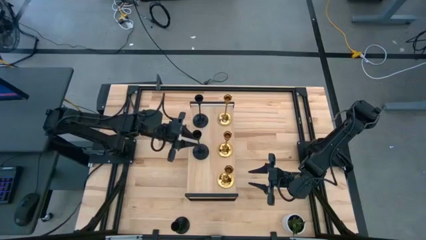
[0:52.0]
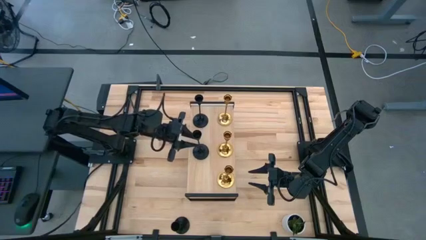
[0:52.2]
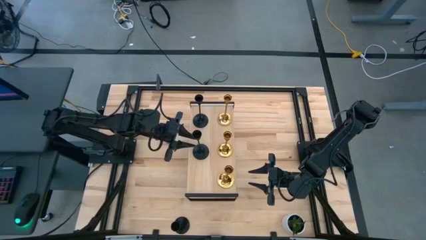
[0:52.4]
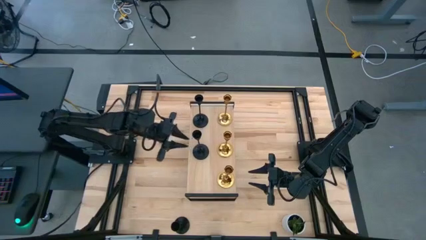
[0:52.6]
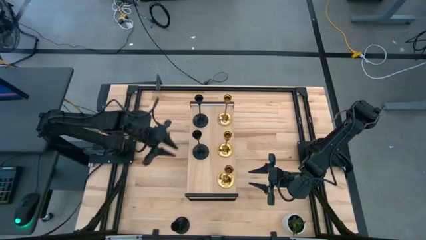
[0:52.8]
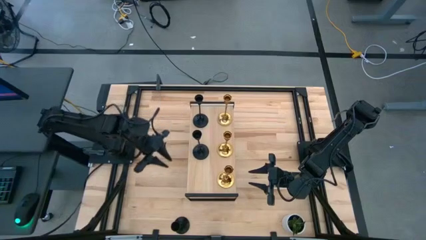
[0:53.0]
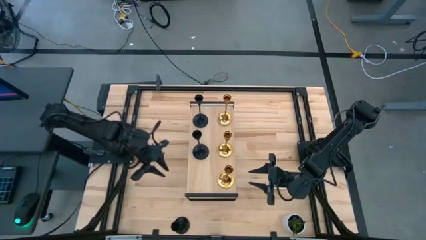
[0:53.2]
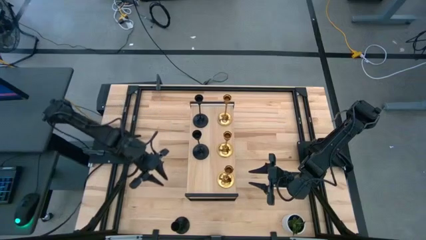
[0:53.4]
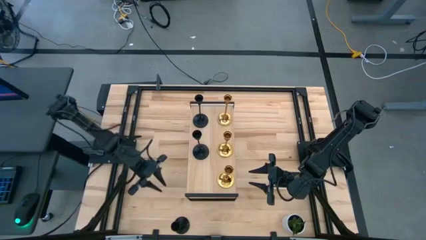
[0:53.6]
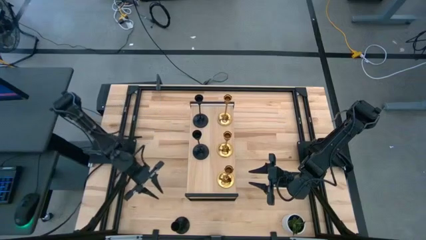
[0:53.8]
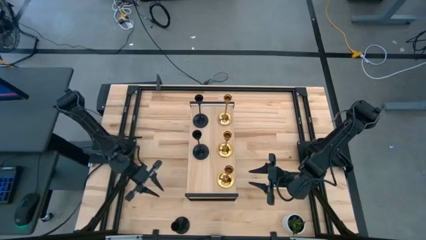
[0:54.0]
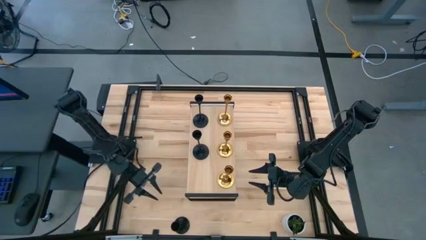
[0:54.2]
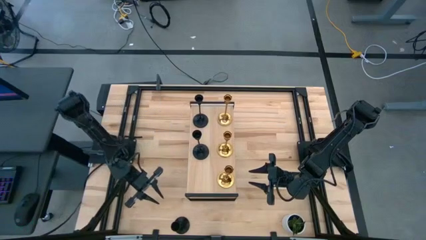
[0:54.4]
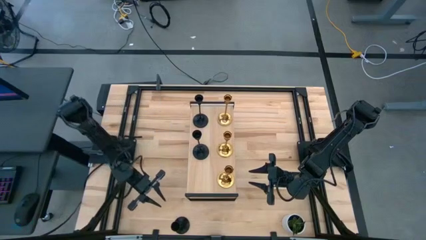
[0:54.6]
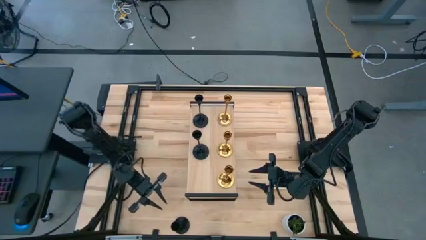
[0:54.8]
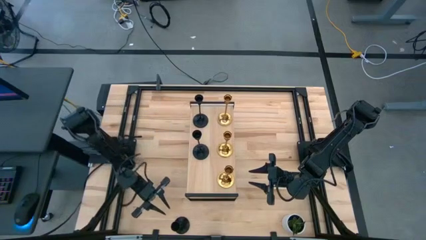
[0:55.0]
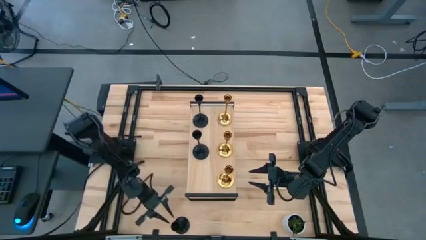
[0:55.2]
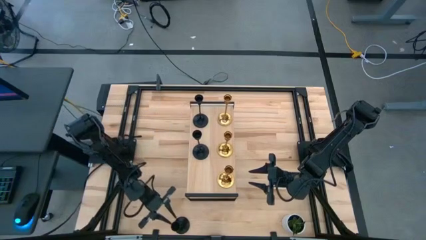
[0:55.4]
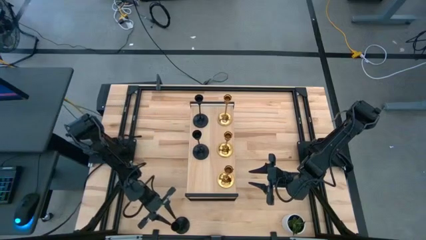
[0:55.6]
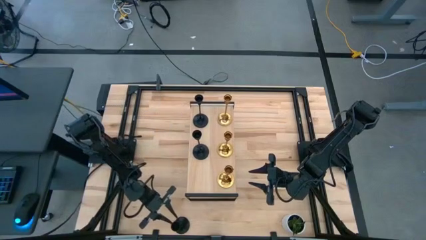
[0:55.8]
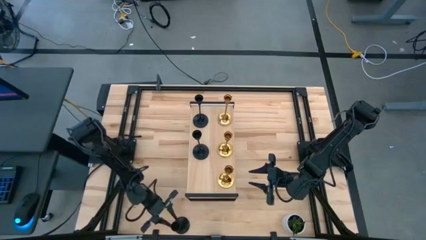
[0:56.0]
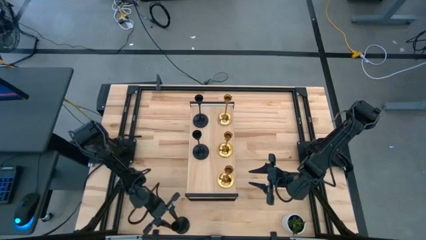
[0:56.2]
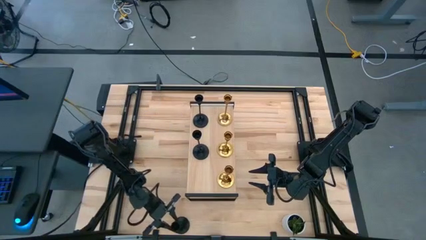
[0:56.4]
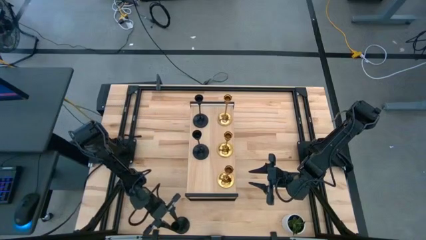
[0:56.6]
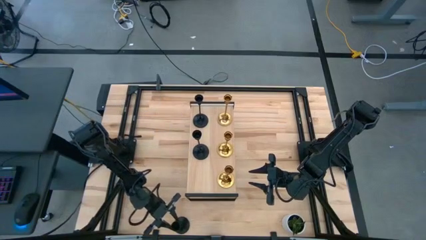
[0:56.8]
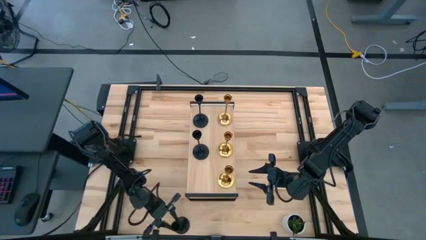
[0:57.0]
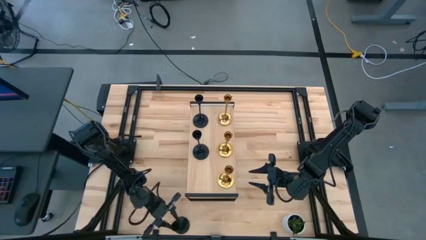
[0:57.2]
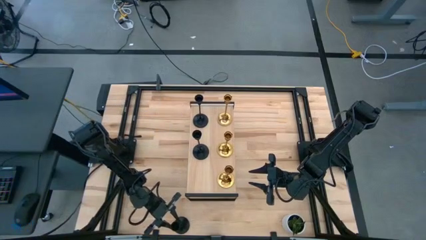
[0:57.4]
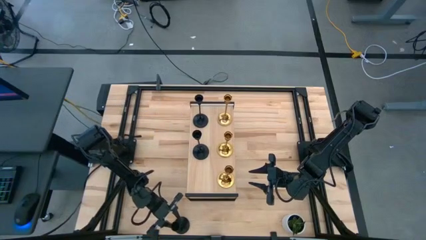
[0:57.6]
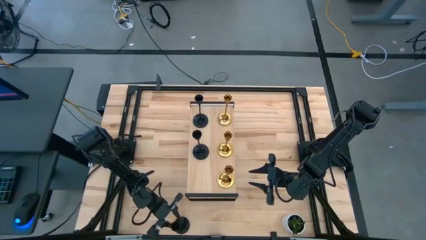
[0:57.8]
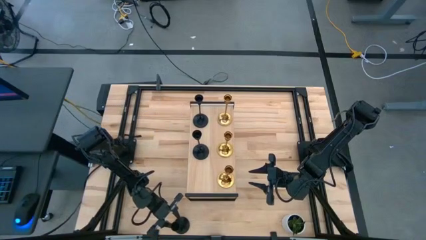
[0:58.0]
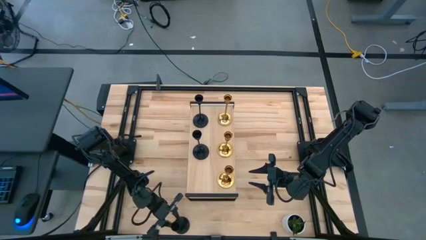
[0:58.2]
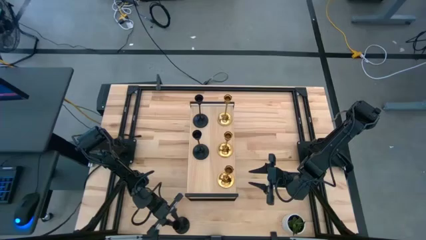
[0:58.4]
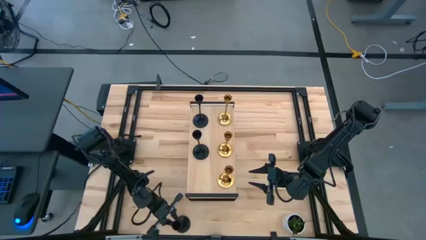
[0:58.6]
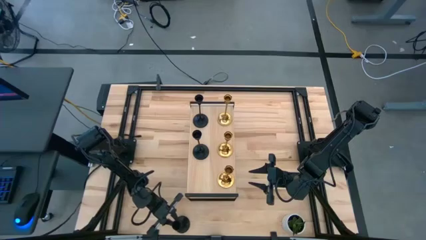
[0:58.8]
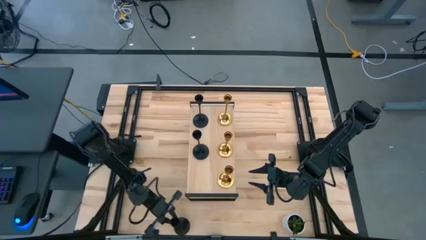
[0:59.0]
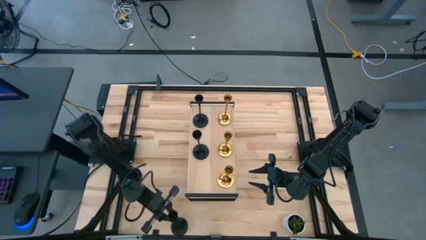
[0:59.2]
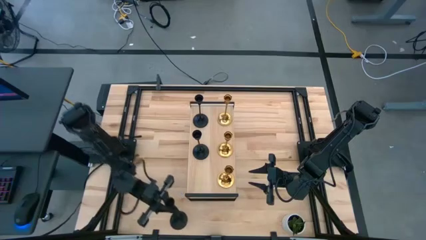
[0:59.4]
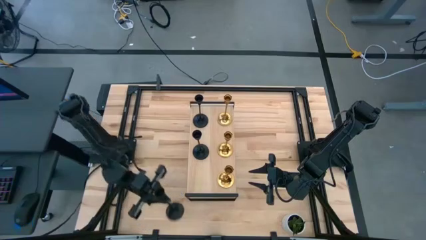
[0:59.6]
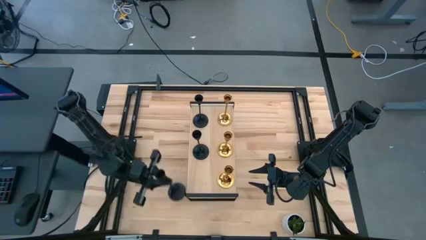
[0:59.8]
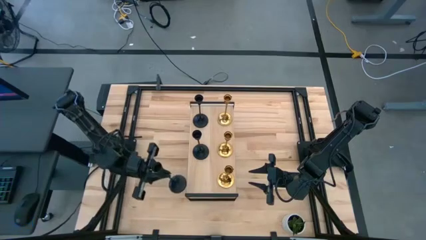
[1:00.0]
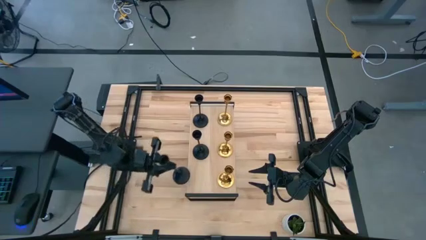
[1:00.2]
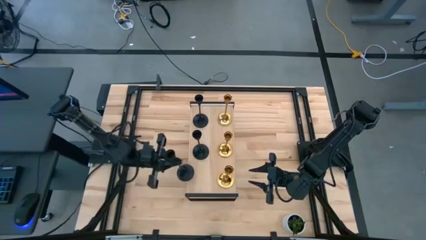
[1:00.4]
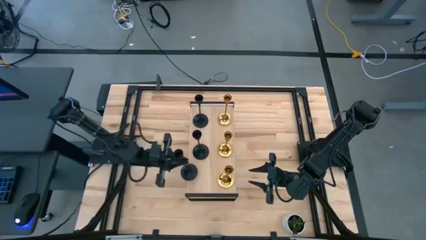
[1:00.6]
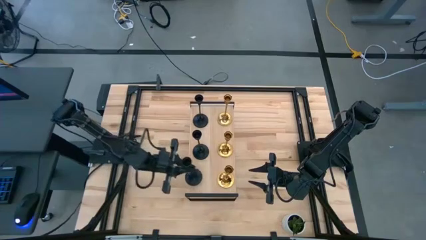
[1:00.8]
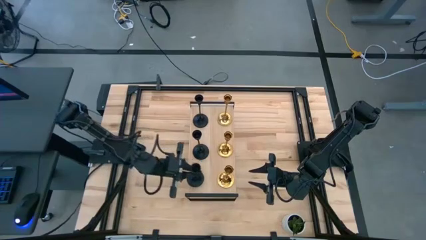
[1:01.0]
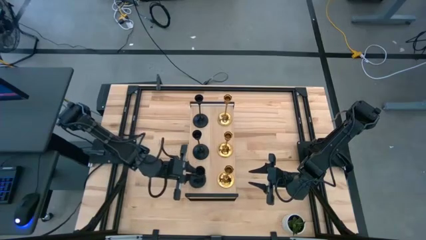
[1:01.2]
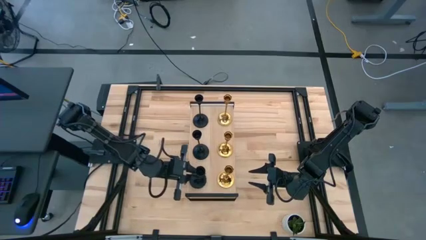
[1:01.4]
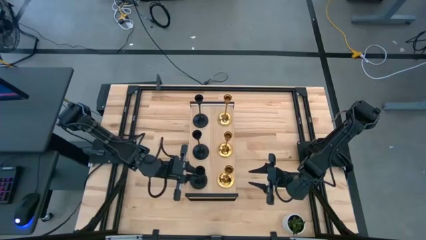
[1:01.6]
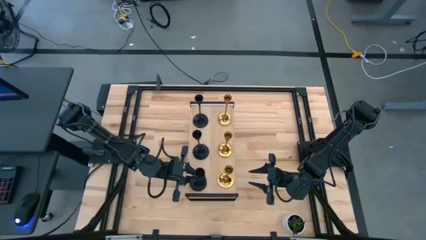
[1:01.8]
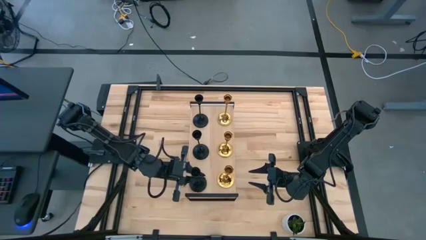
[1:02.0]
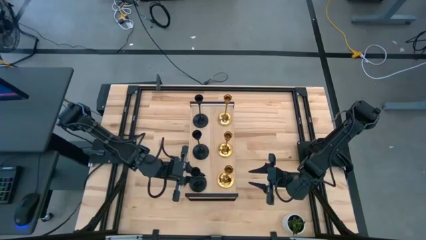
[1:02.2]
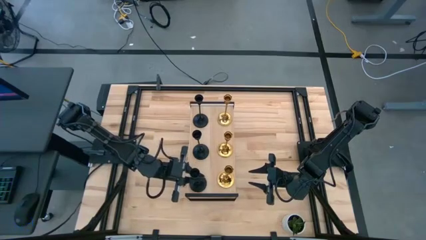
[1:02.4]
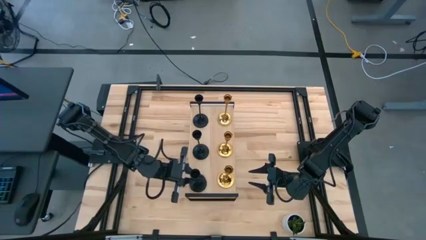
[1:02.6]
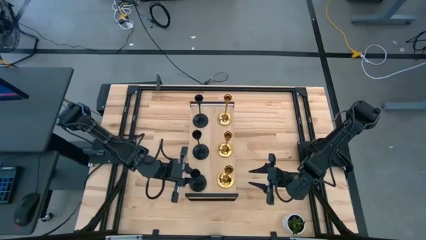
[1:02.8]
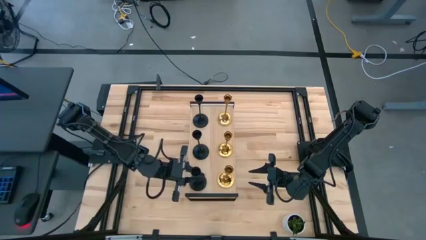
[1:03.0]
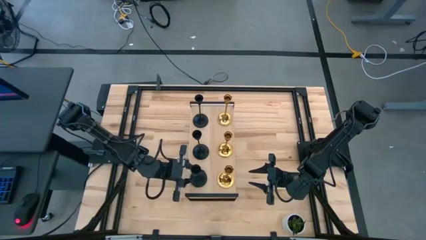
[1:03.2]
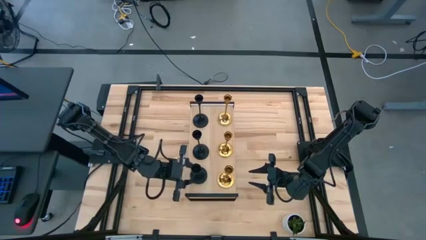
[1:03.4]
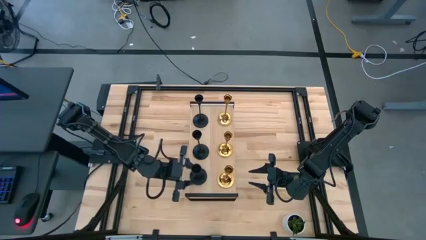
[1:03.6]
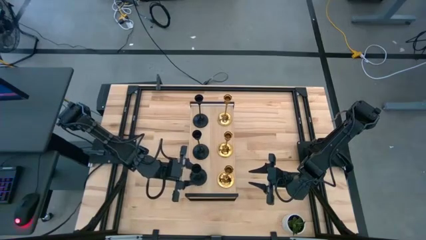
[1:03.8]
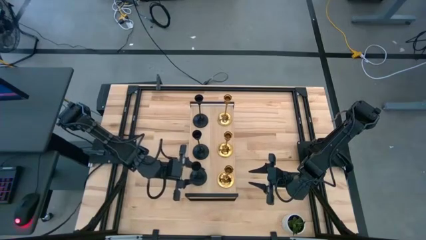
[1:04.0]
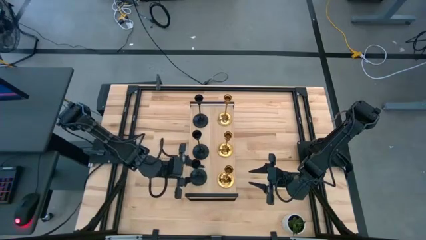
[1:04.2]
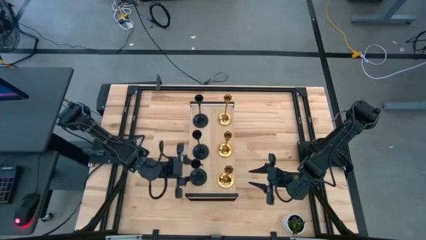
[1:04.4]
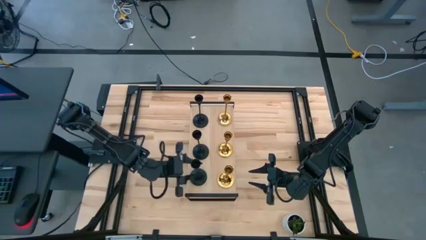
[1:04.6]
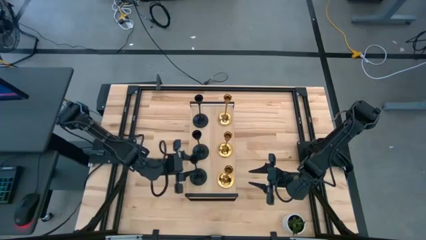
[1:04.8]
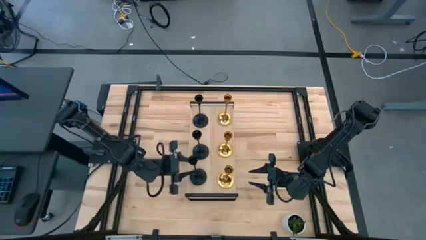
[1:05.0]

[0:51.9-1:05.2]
Task: Pick & Place candle stick holders
Put the black candle holder on the shelf aligned with the other black candle holders

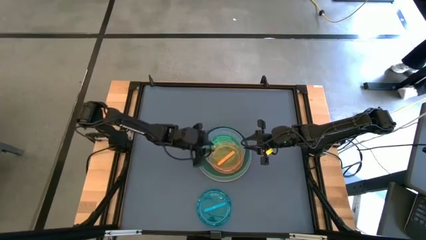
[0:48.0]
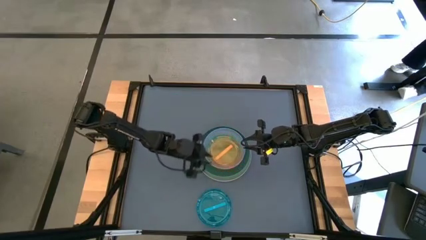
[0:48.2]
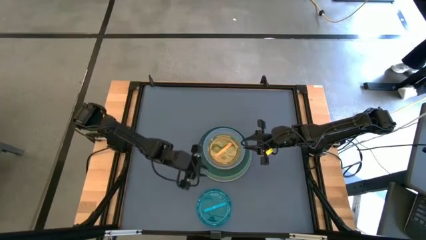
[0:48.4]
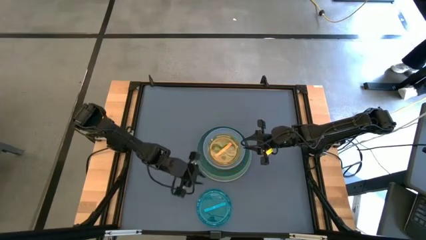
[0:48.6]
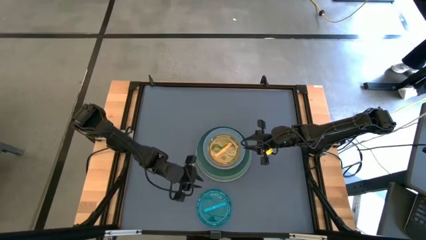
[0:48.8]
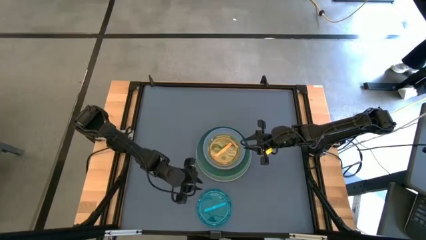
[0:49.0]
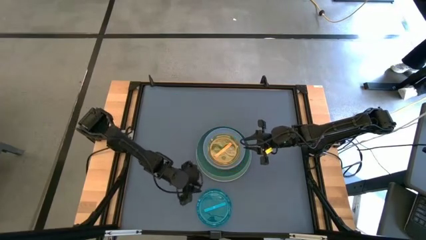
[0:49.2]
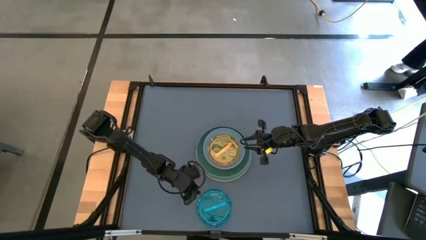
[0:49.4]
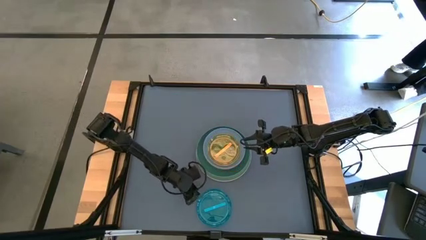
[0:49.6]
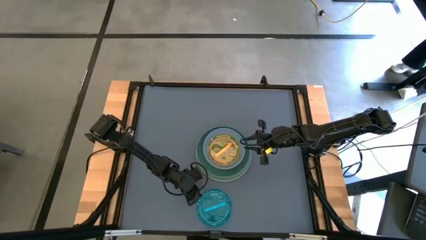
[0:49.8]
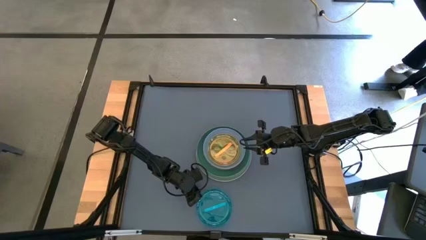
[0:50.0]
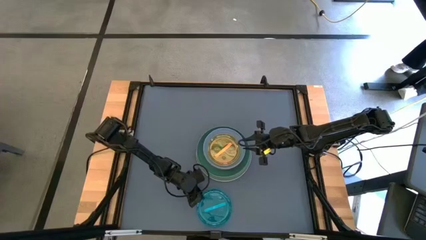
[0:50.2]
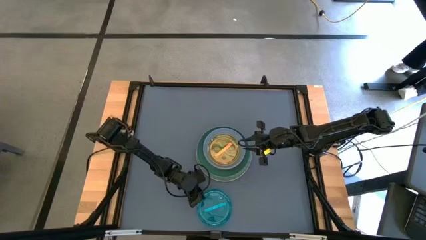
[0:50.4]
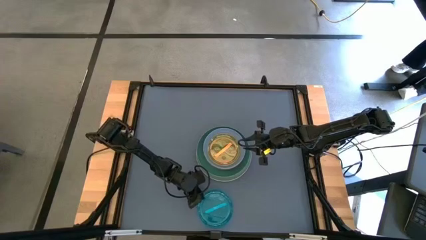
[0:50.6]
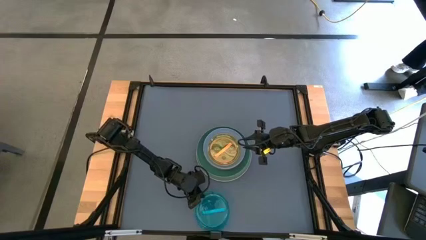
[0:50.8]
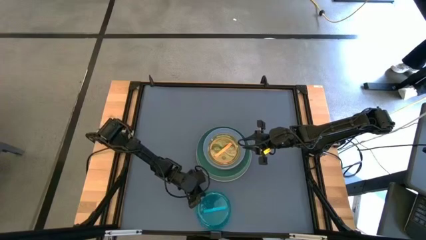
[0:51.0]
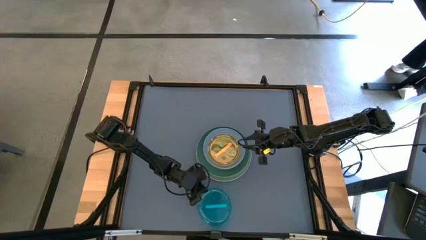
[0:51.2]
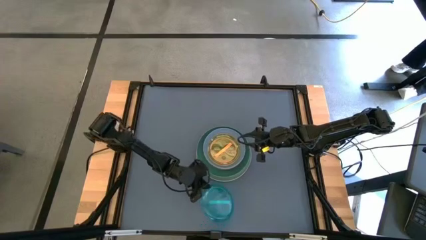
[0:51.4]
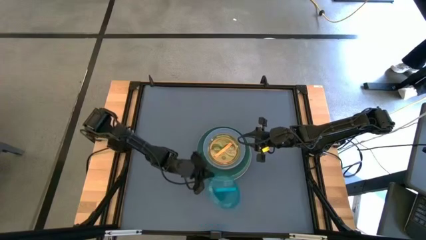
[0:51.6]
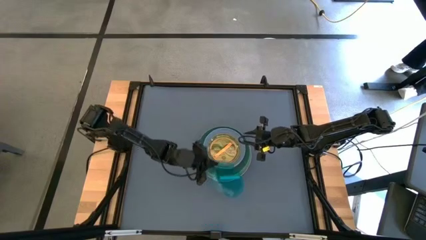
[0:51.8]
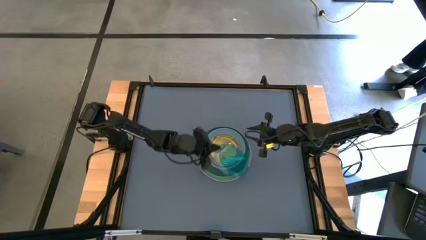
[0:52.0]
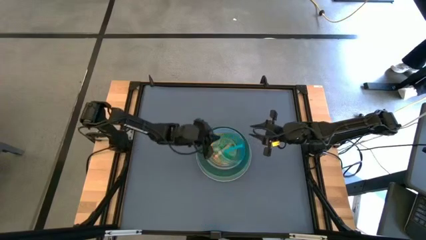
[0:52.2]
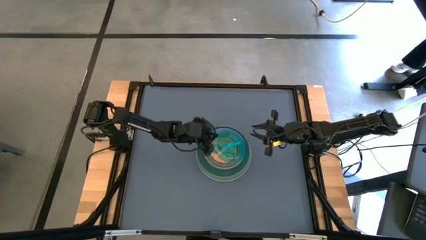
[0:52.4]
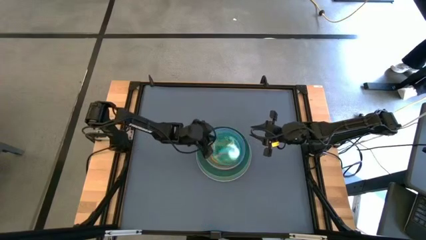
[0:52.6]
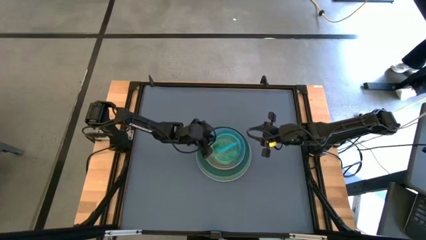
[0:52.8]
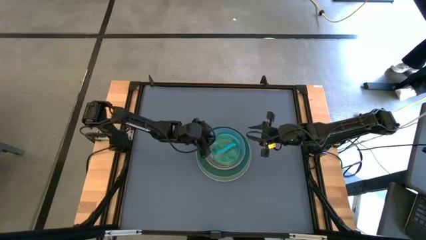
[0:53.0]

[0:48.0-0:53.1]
Task: Stack plastic plates
Stack the light blue plate on top of the light orange plate
